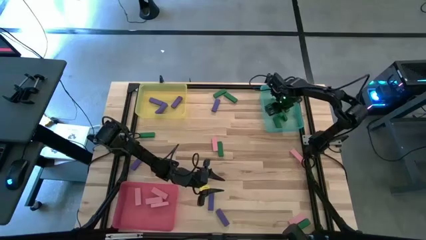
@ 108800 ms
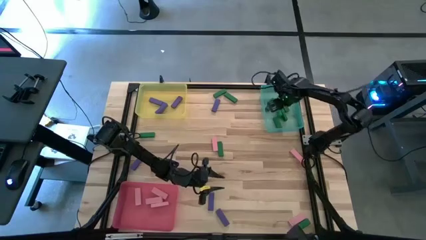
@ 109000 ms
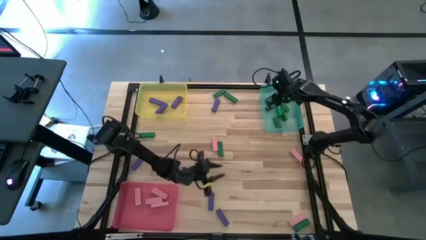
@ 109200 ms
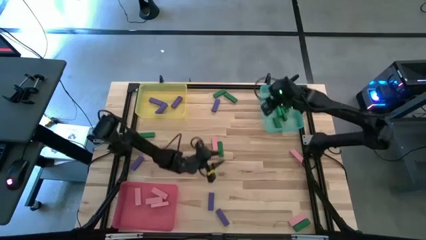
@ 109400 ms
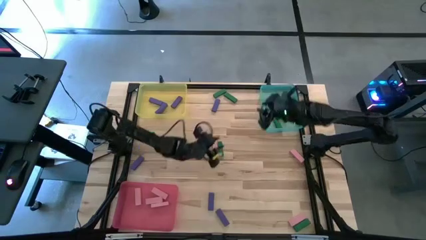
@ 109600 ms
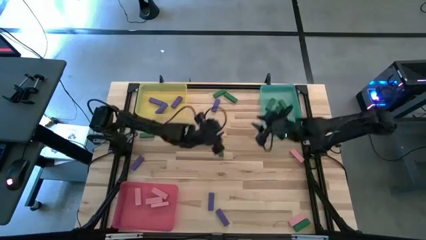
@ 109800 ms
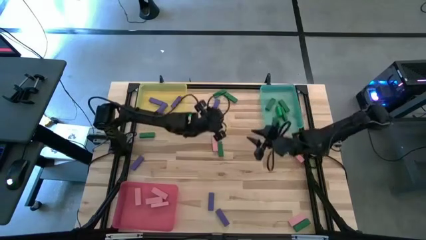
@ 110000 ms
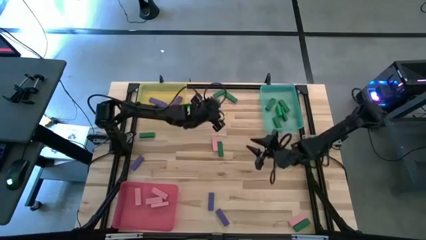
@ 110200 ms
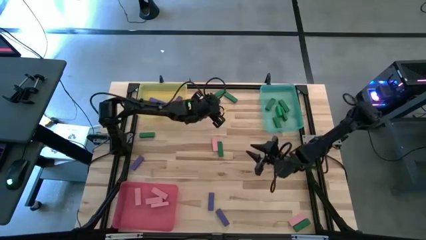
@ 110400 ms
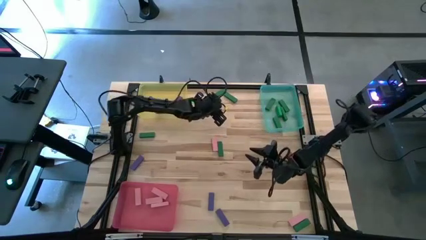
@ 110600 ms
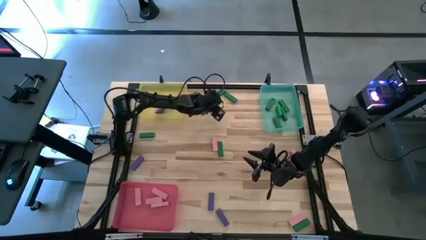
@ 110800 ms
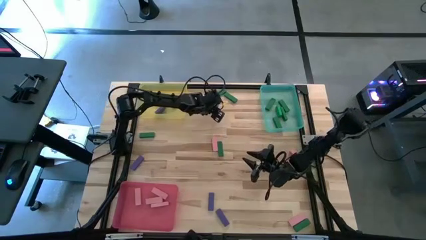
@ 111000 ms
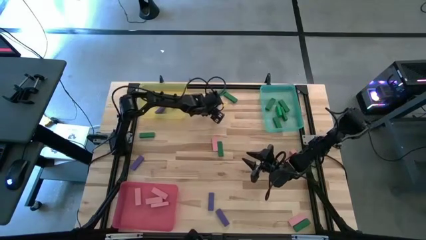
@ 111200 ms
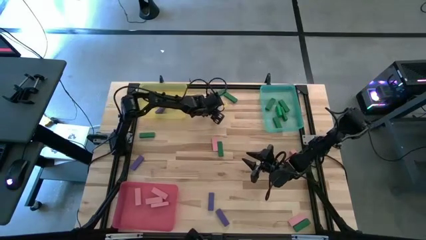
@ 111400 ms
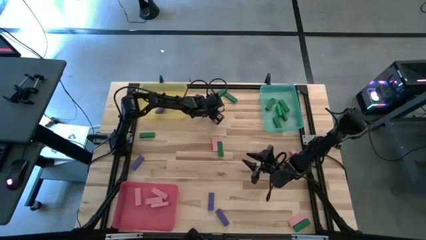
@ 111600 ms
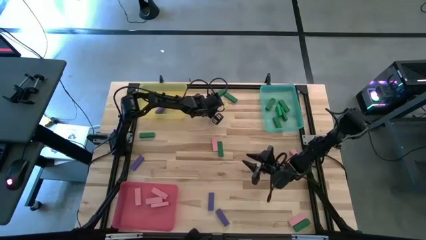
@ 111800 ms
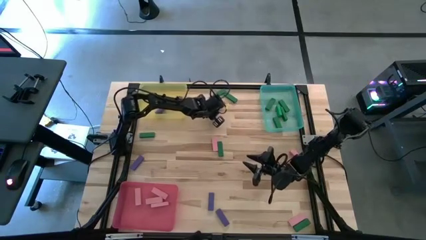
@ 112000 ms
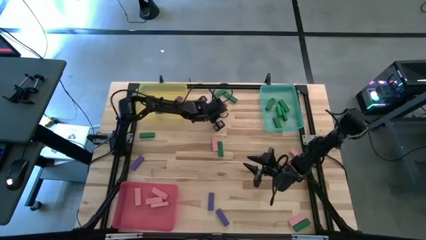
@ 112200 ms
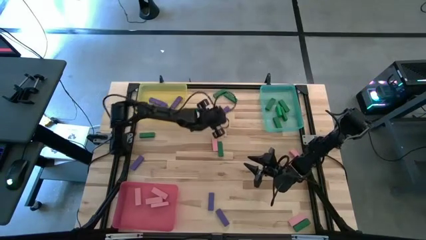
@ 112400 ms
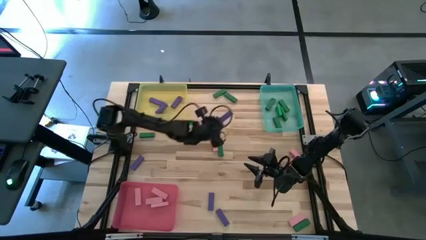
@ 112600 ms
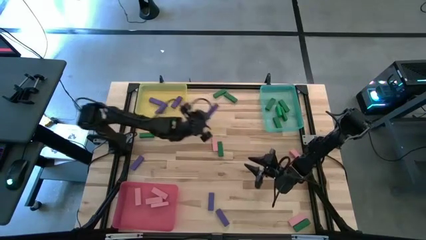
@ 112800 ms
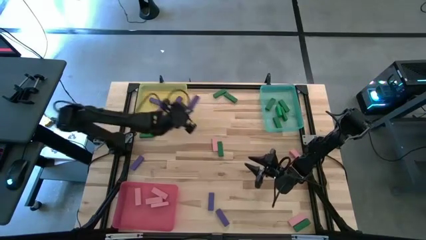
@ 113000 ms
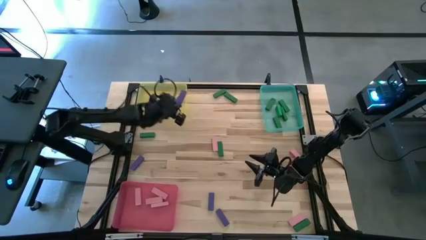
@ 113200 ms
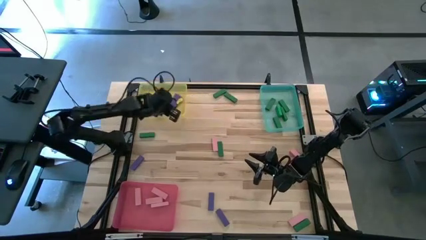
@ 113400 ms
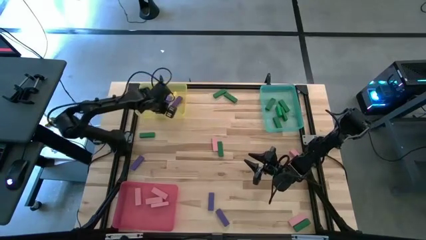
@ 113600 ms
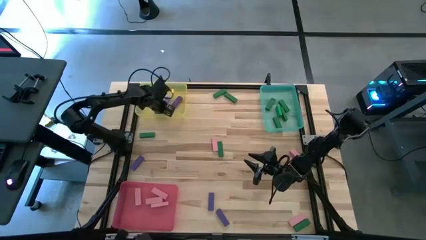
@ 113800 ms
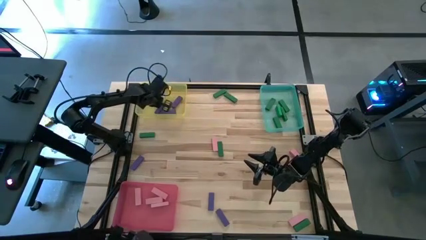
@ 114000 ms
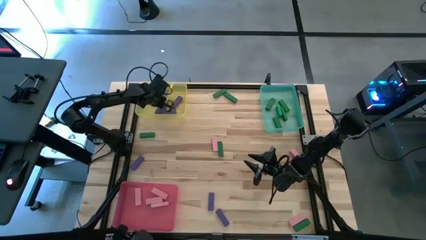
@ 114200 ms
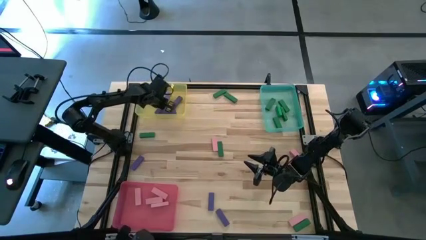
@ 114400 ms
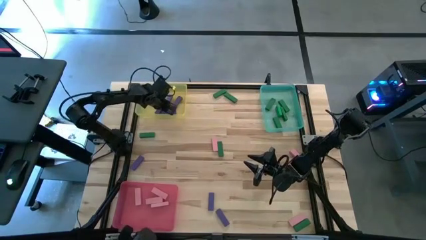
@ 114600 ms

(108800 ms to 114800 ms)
Task: Sort blocks
Put the purple wooden block into the yellow bin

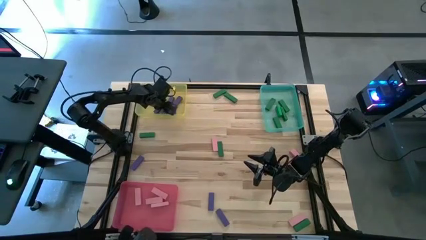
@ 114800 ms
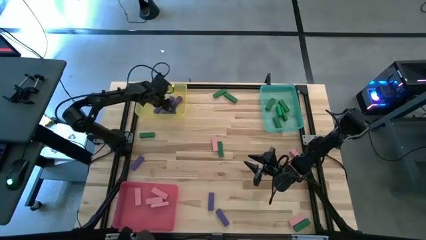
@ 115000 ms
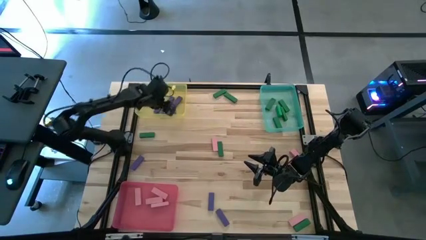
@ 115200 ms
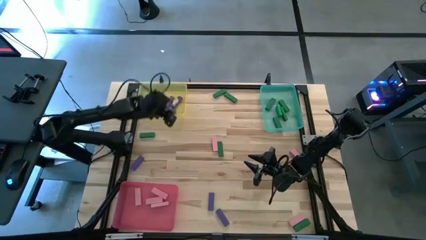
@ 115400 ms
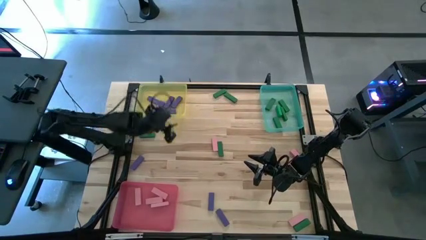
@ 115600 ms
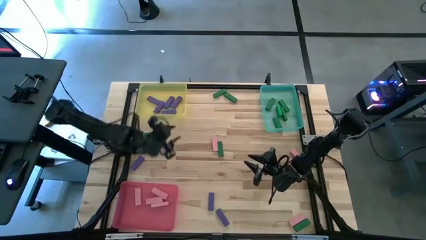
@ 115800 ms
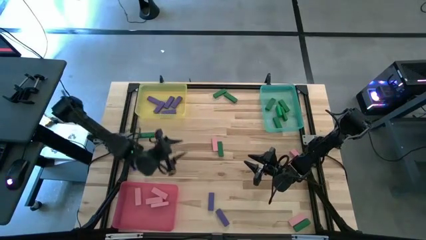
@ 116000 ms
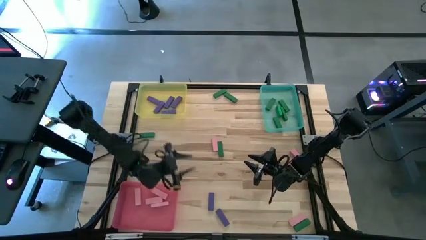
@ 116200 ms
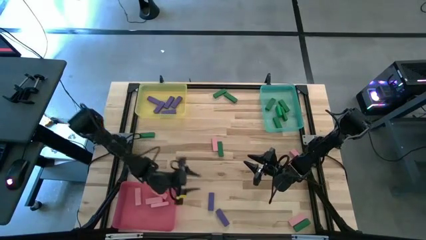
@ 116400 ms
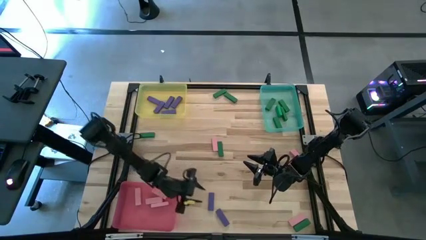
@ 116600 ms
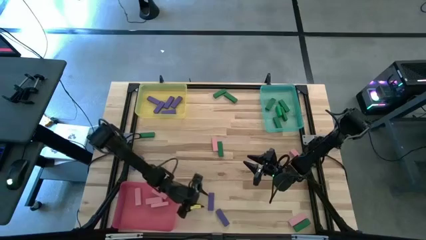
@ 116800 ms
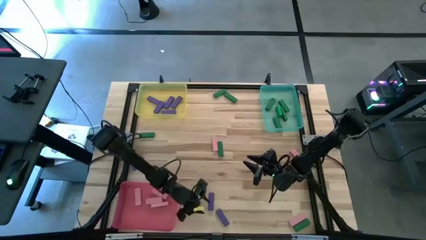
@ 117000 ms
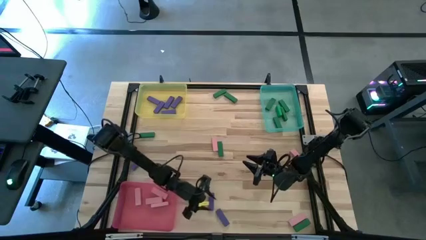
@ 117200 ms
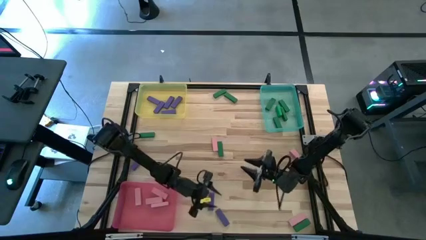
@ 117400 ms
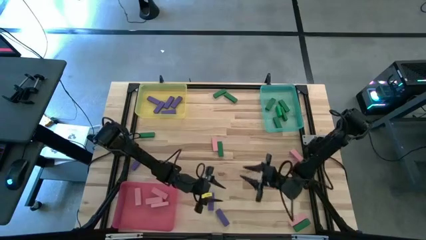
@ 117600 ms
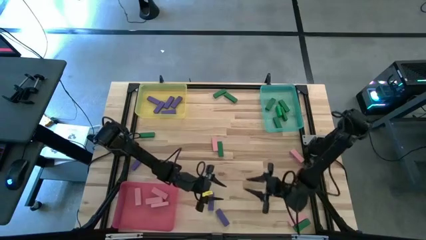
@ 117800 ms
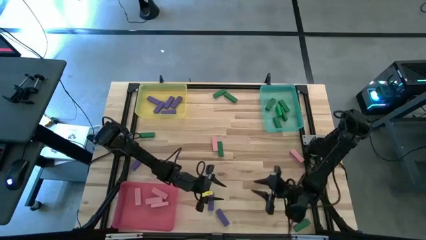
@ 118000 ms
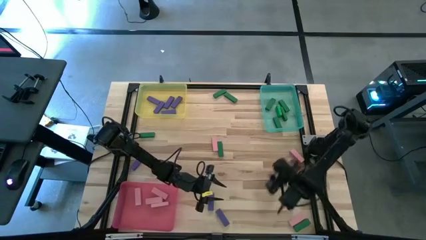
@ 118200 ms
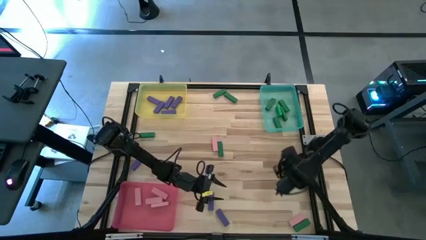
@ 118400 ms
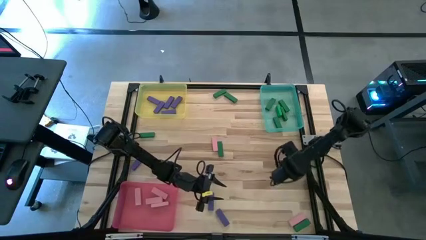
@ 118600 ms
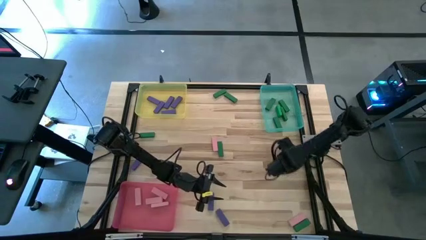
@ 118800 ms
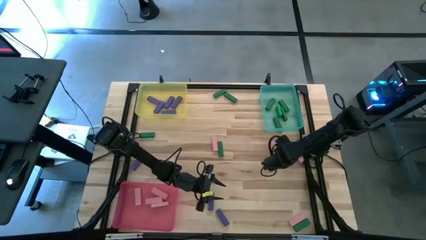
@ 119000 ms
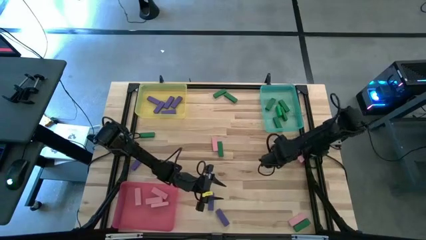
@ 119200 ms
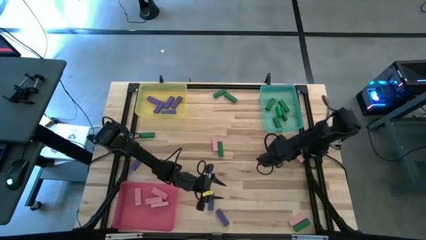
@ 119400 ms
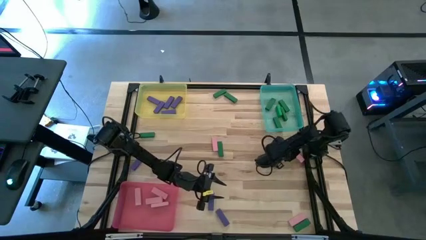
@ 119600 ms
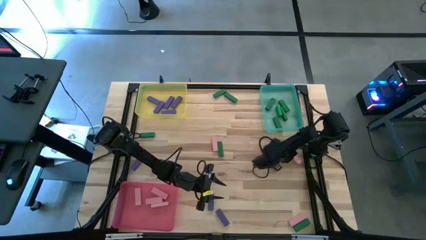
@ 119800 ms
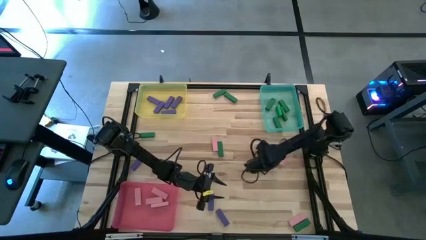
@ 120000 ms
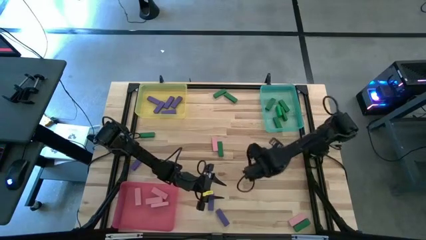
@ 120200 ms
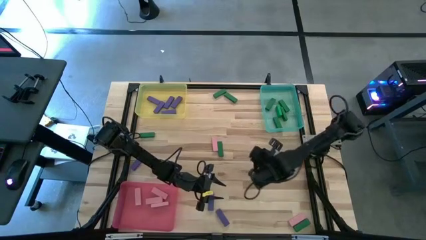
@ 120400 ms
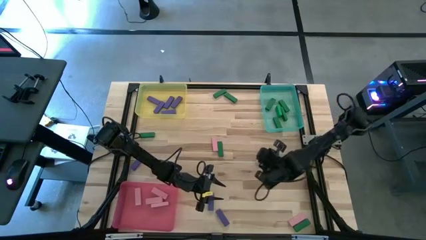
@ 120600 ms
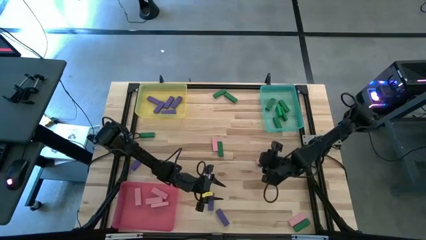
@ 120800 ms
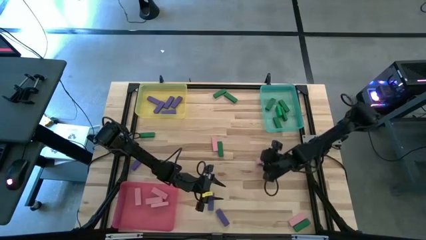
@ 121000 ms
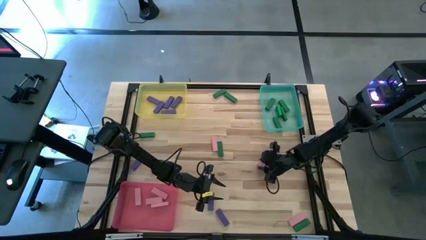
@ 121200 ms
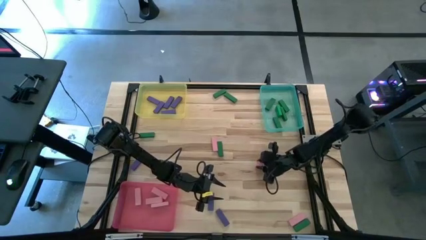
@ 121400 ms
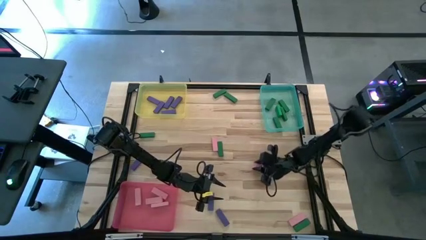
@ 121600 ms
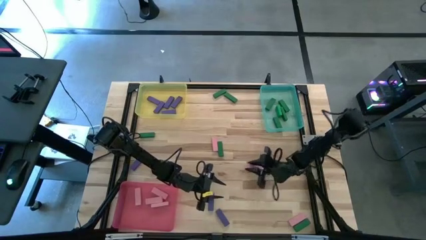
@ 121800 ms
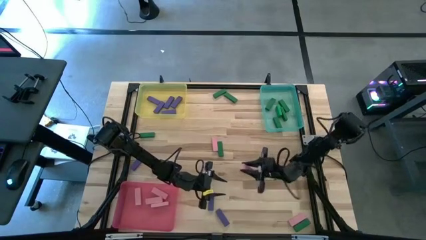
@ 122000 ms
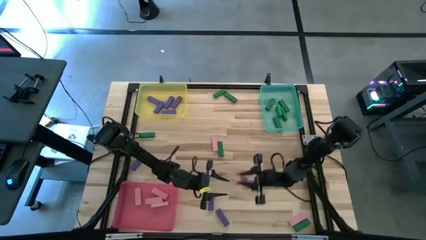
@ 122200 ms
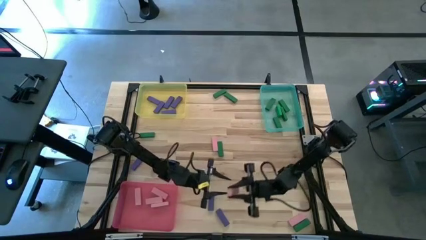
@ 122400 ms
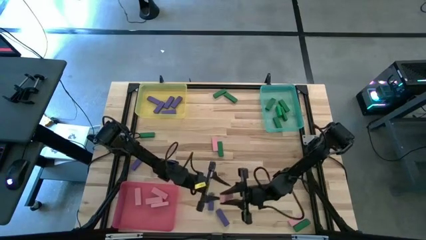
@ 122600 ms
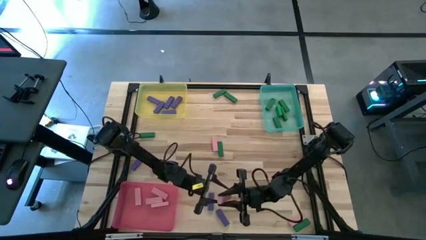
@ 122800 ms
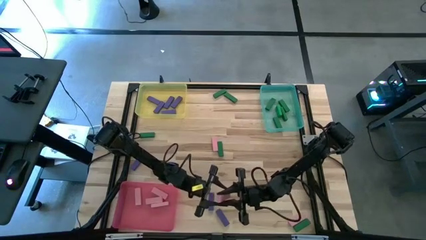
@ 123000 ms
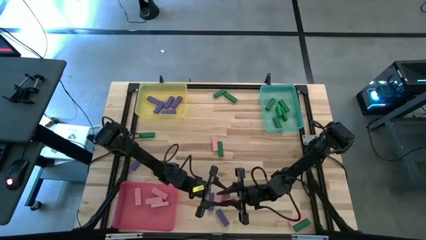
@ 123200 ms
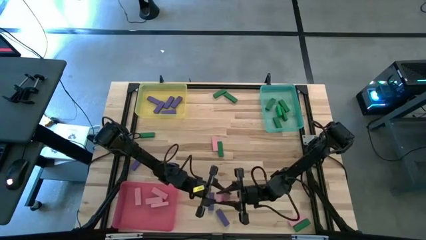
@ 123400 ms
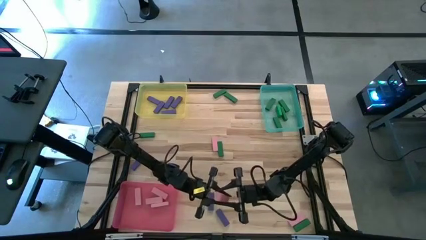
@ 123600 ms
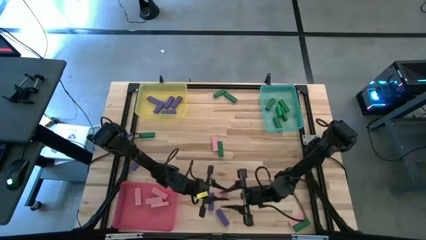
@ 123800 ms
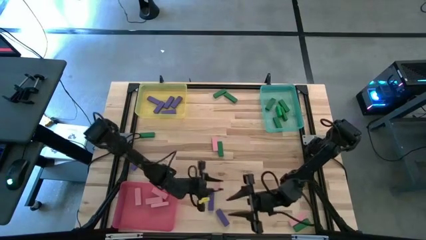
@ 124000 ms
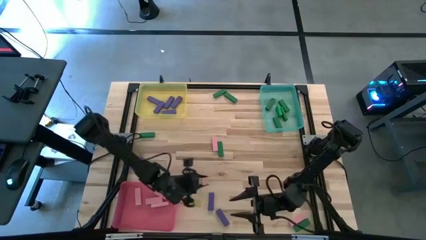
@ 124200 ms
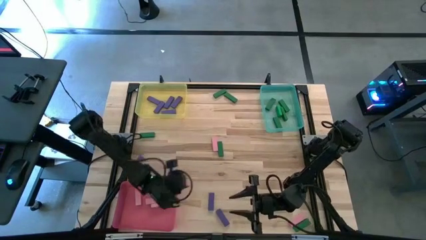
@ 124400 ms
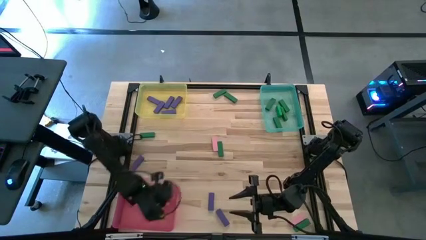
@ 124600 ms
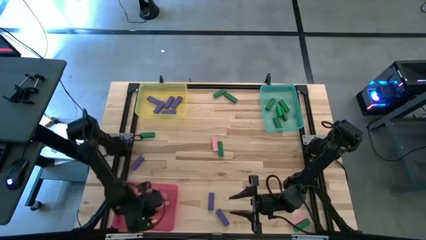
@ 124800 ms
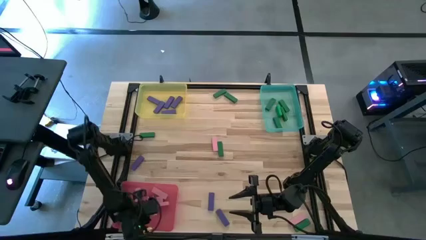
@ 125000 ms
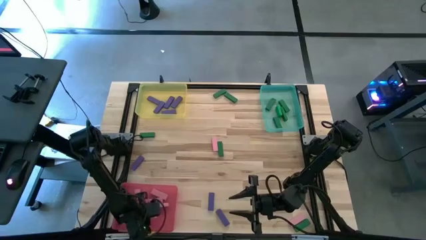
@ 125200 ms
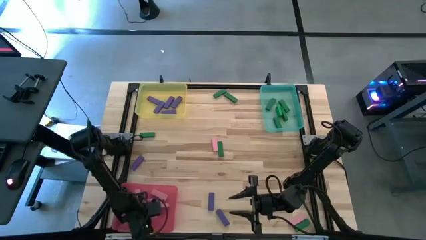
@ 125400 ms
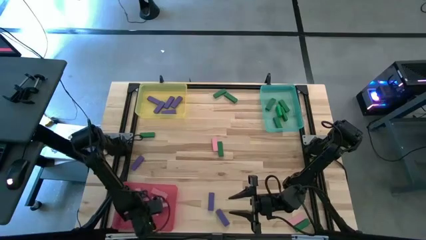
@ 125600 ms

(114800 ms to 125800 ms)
Put the pink wooden block into the pink bin
